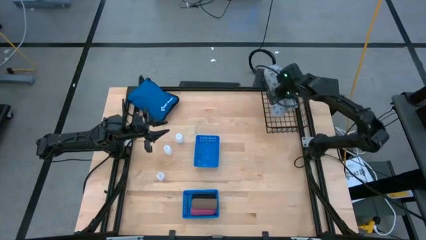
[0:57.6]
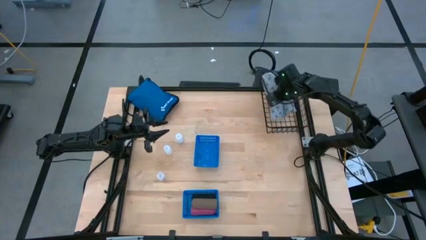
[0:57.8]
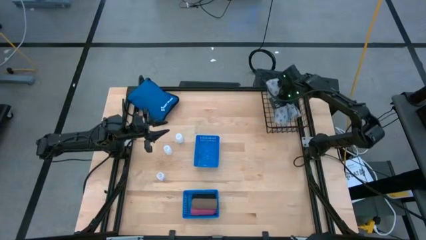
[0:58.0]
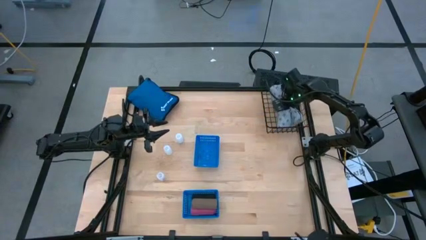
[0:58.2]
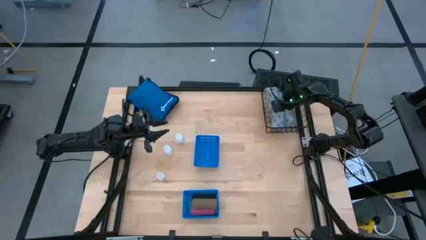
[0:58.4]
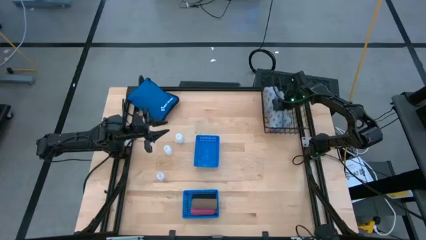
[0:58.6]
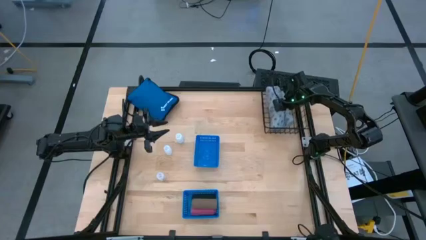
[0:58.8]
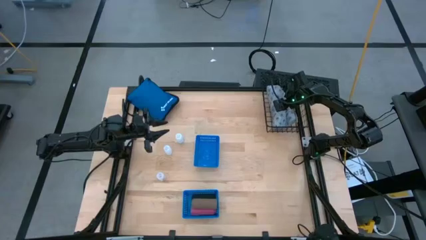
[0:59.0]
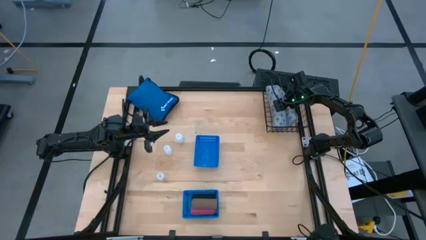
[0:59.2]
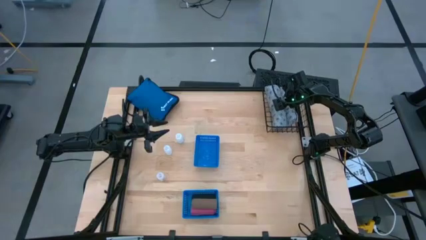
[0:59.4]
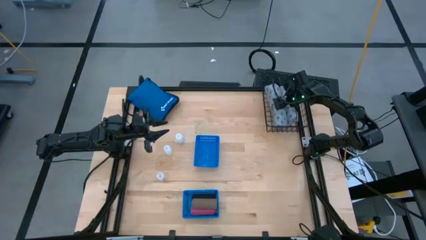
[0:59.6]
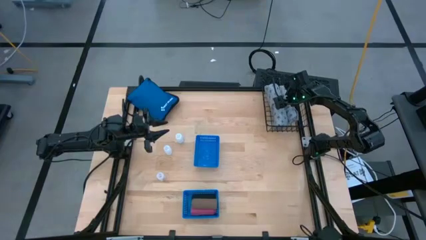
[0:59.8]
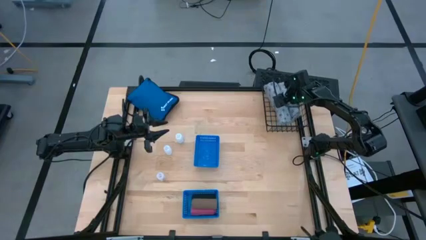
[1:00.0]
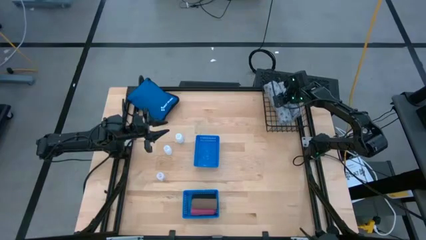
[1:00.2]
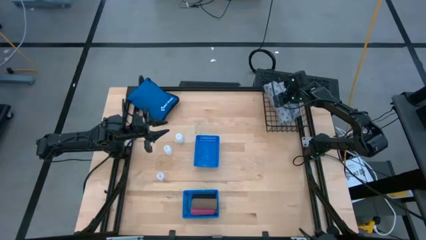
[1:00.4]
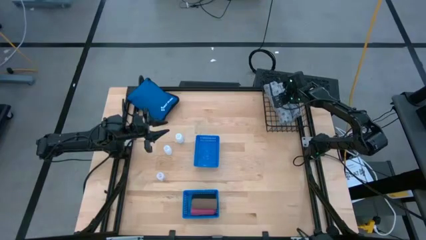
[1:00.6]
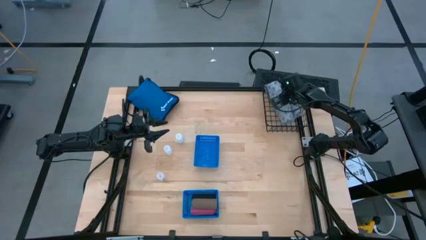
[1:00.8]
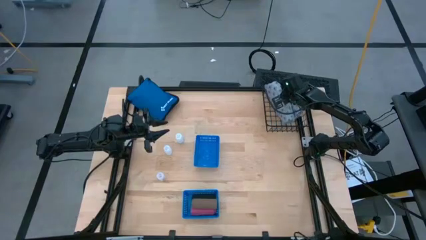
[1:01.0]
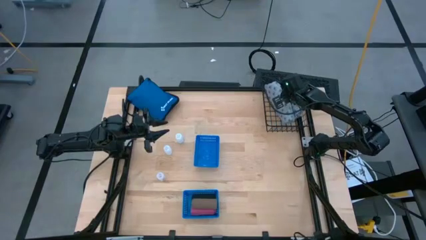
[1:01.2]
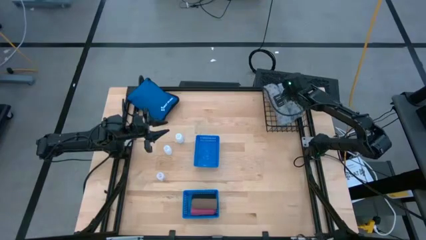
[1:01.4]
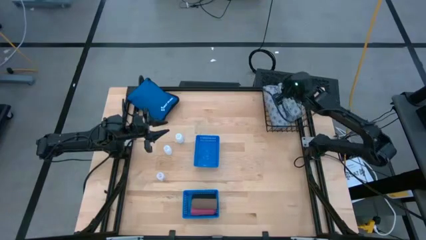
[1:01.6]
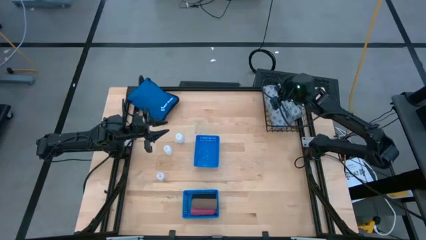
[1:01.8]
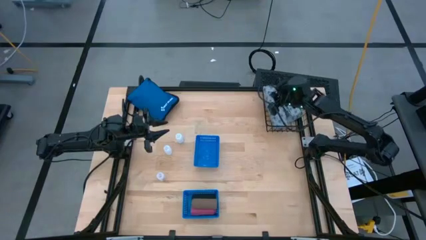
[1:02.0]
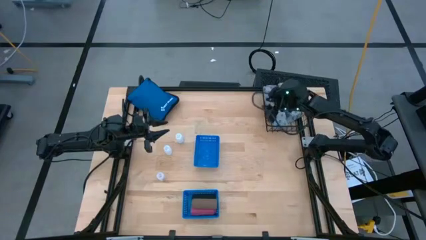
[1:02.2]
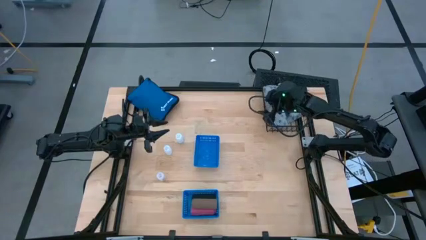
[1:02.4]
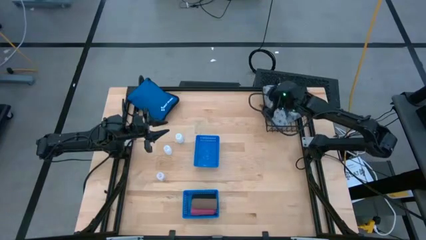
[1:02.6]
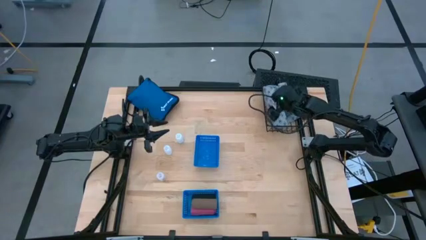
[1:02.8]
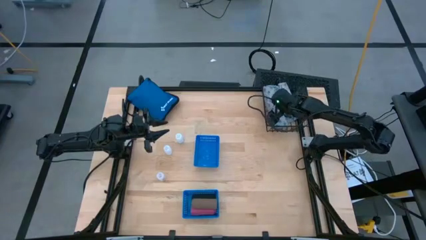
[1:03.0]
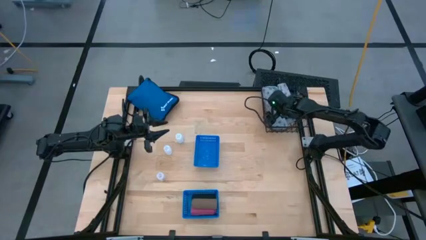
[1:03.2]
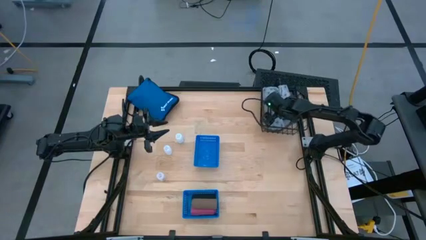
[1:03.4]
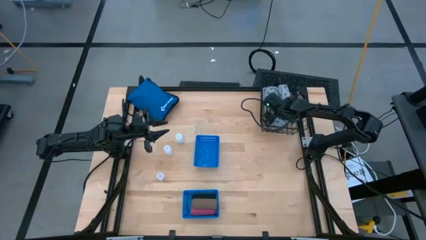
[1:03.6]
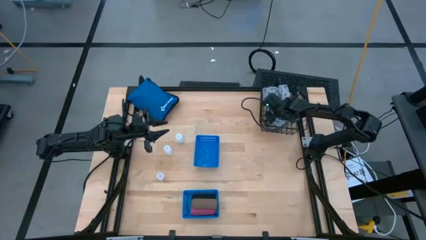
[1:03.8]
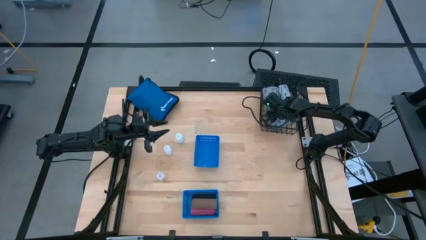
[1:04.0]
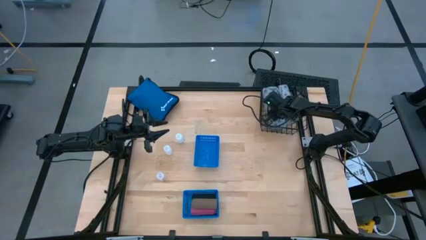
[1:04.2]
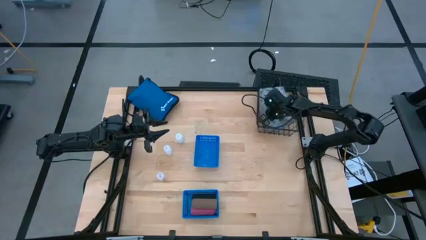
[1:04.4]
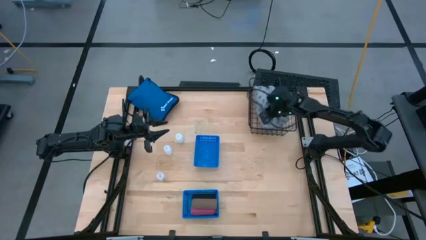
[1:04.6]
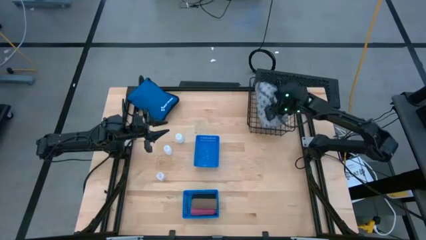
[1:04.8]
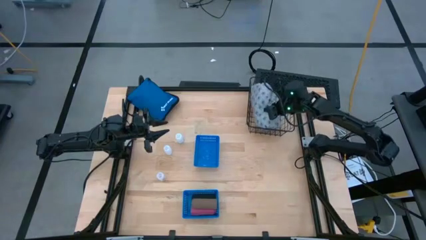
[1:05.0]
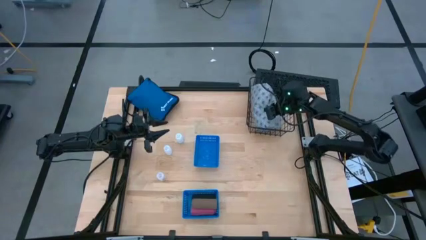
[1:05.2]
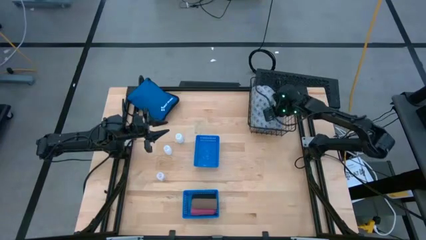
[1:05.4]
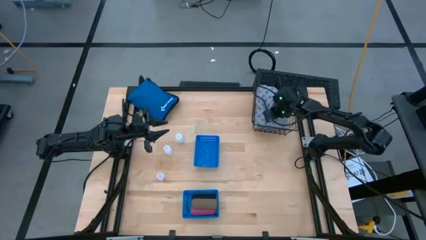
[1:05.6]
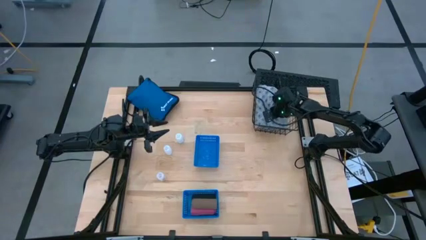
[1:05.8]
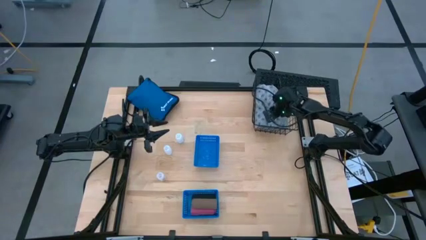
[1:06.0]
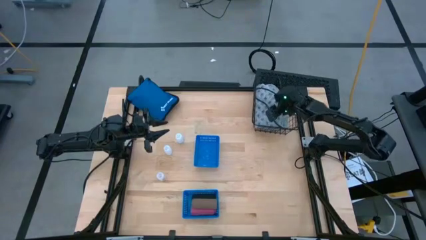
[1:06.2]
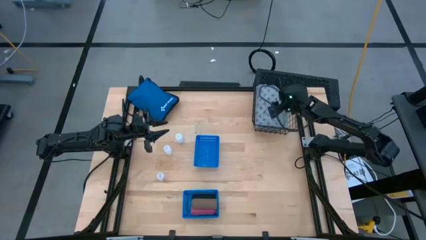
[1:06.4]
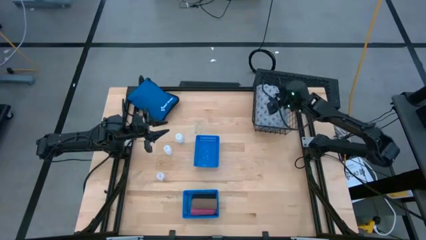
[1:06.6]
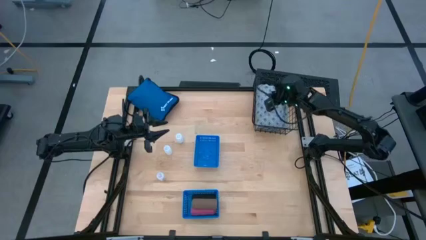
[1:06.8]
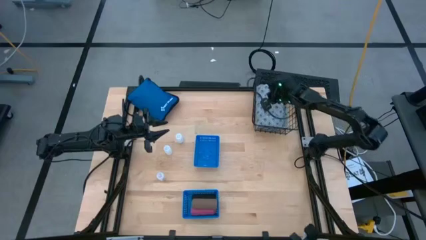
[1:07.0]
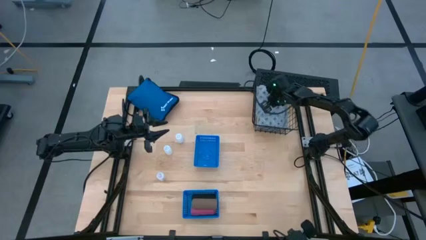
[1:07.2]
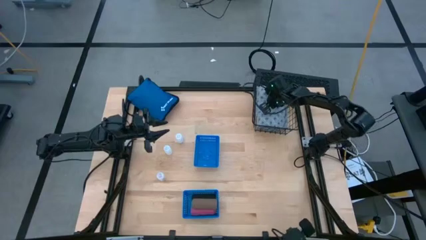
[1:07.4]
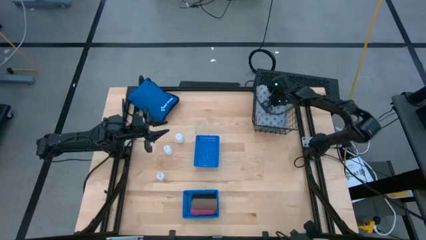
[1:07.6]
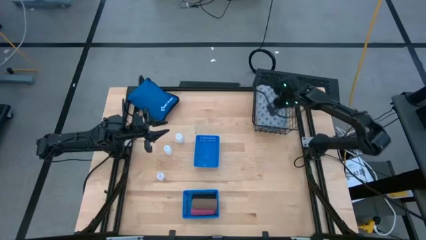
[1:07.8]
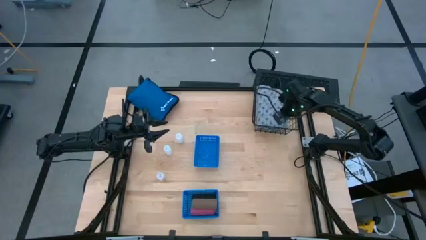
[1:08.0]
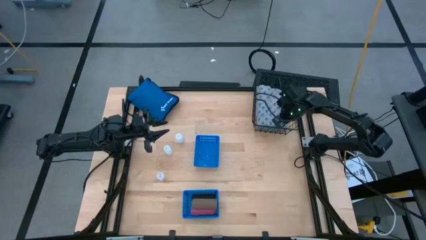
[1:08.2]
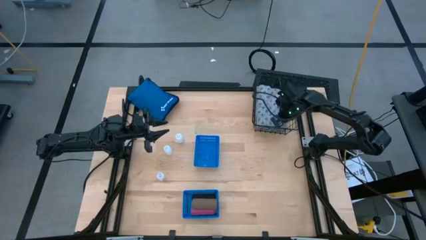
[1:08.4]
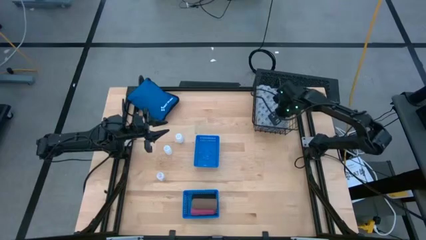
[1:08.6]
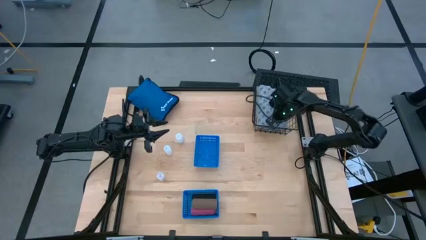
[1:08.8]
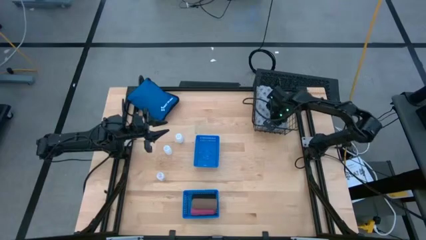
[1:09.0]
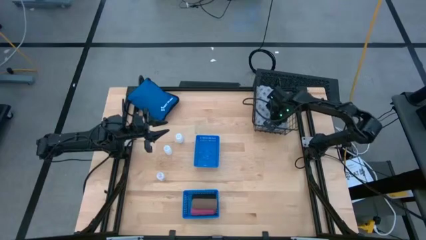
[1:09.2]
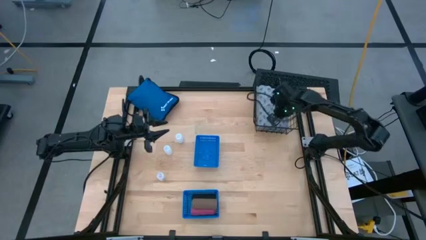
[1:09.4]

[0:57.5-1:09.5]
Task: Pick & place medical supplies in basket/bin
Put the blue patient gown into the black wire basket

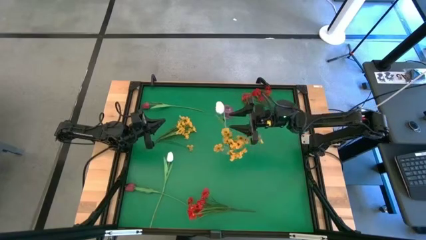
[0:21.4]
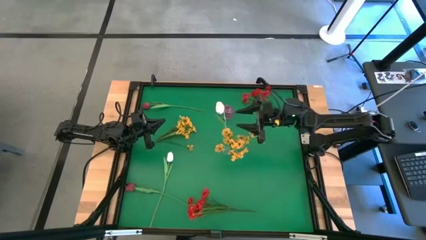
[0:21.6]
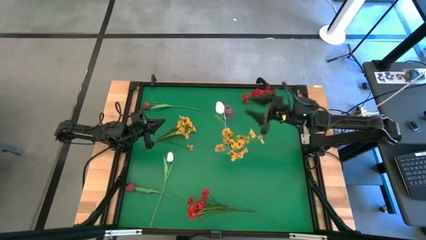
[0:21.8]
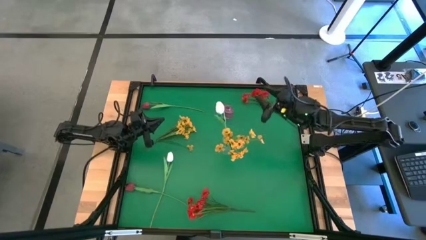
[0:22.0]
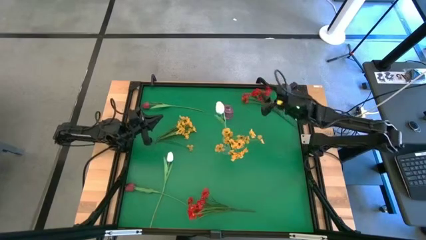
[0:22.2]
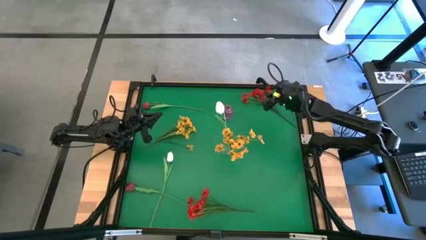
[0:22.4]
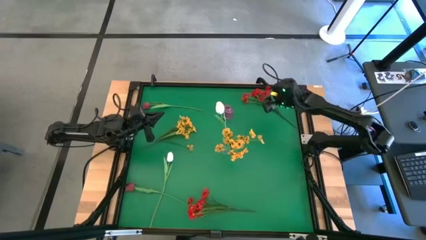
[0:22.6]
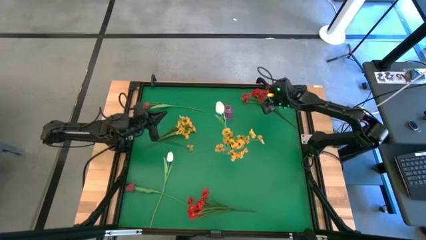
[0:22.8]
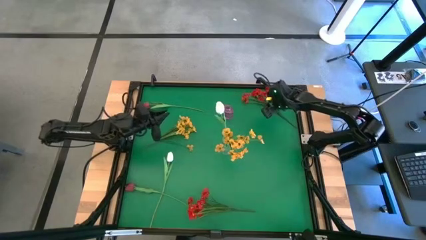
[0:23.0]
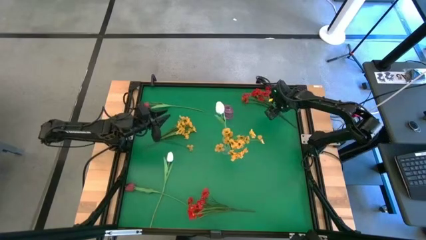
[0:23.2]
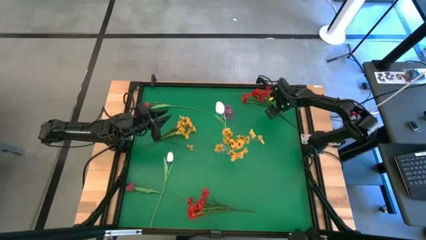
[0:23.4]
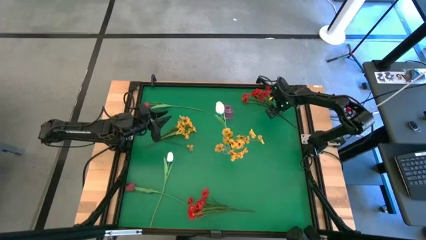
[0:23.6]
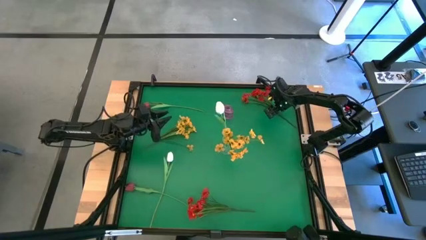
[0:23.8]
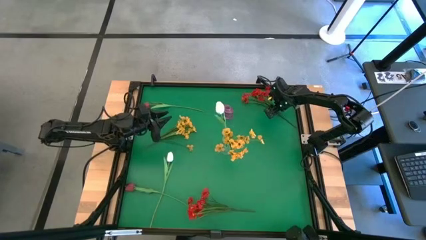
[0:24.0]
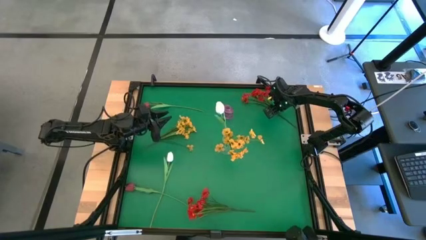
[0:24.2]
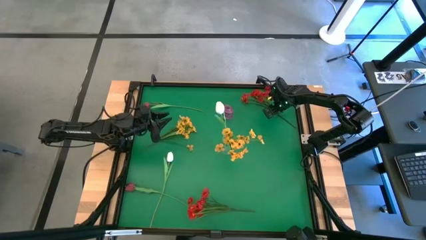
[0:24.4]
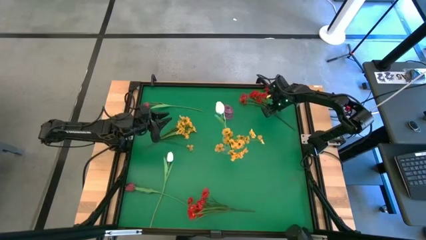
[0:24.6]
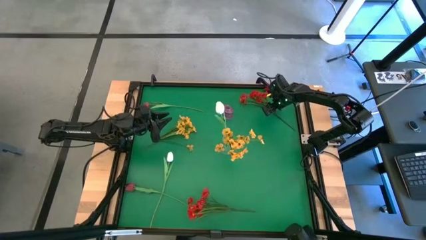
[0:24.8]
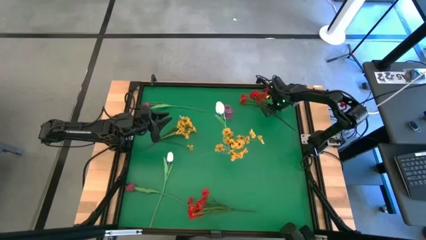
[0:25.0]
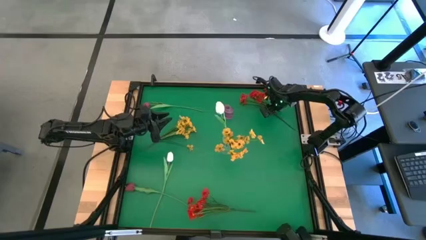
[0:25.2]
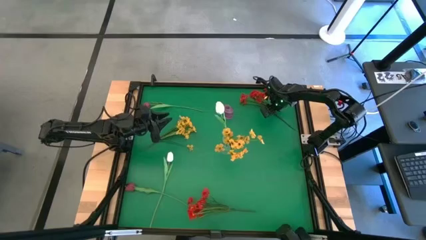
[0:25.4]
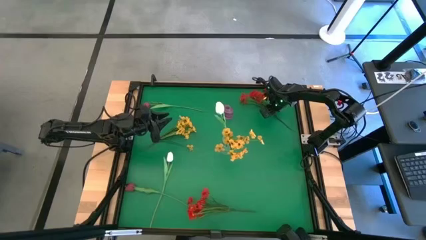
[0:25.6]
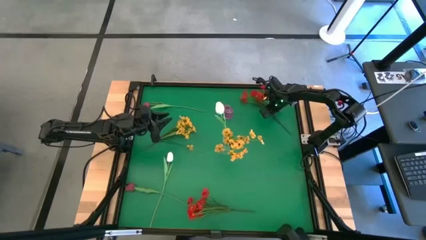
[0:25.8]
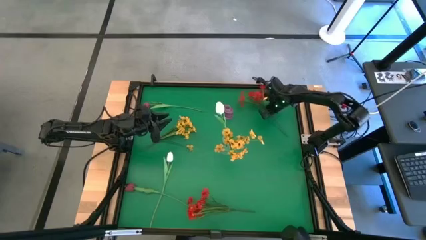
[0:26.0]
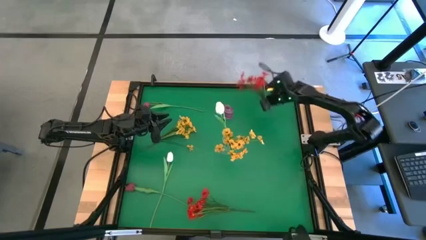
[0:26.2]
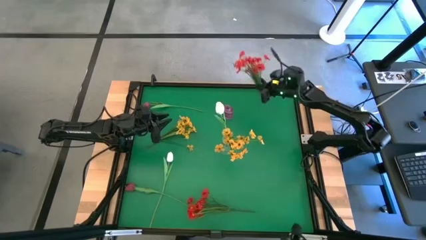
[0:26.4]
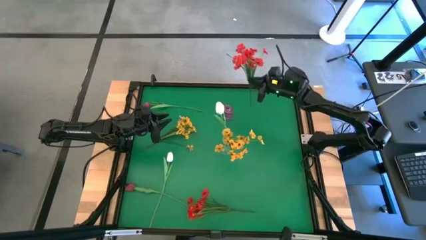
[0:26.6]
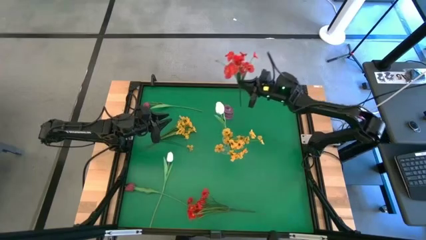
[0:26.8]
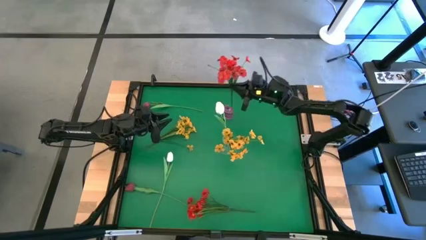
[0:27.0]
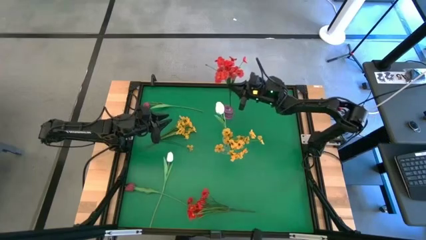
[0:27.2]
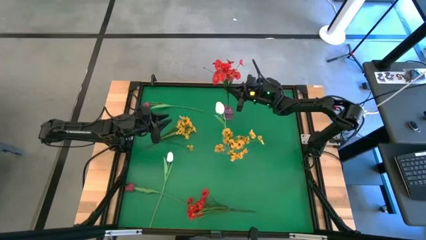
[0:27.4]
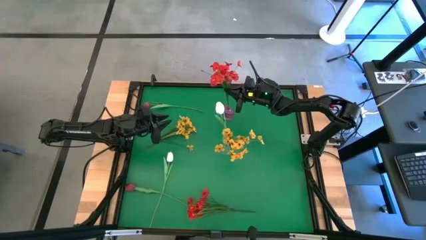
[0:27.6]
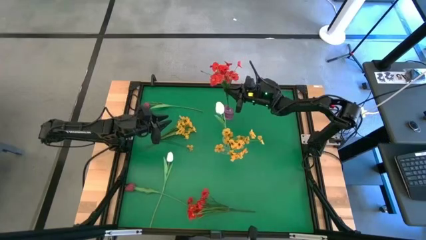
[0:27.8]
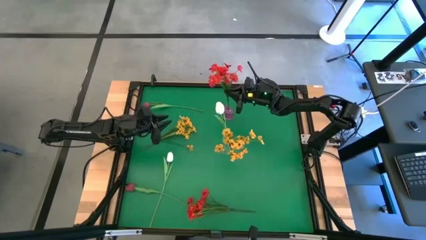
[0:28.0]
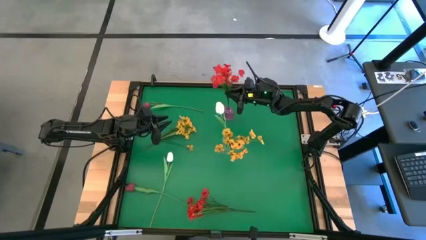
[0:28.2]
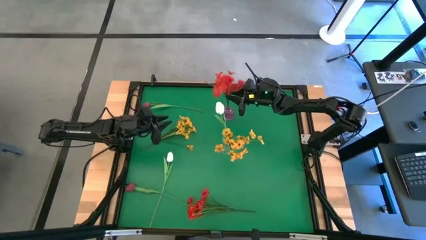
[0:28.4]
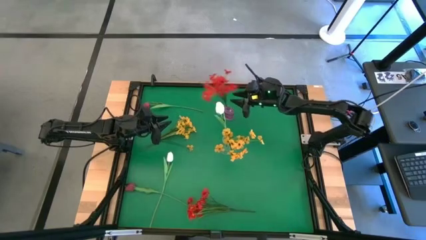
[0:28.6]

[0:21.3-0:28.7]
Task: Sort flowers into vase by color
Put the top red flowers into the violet vase
